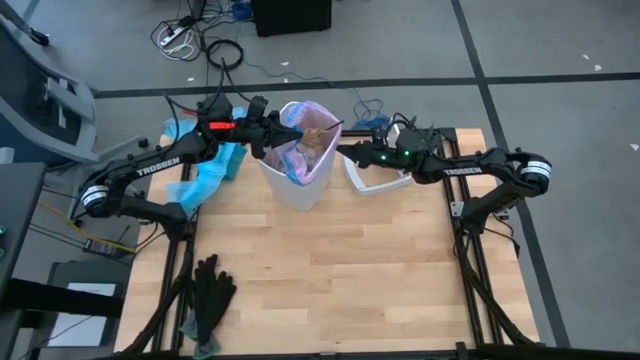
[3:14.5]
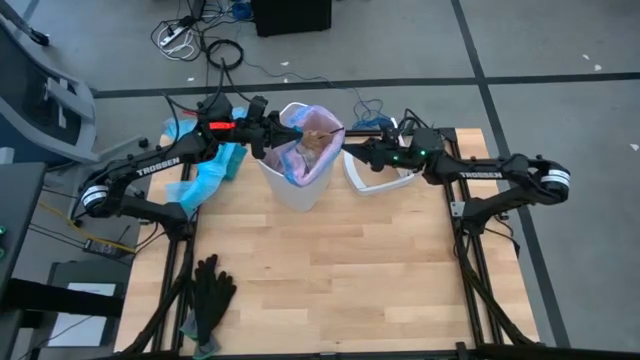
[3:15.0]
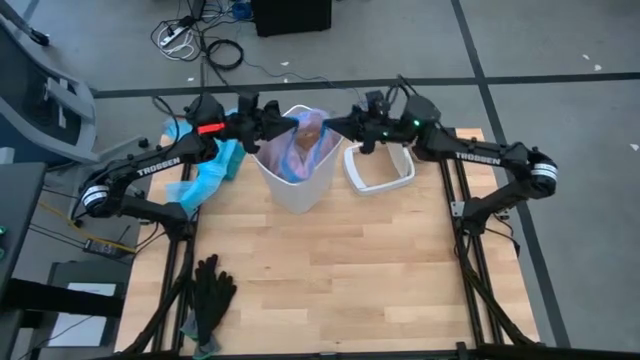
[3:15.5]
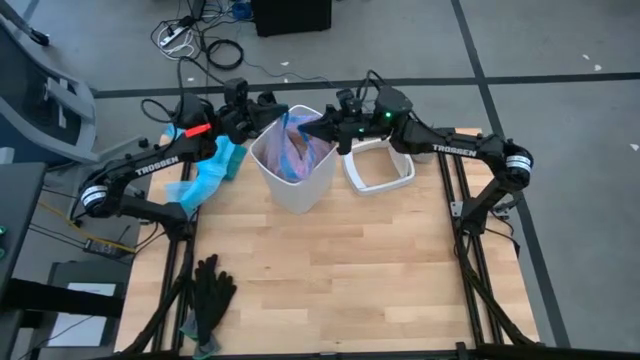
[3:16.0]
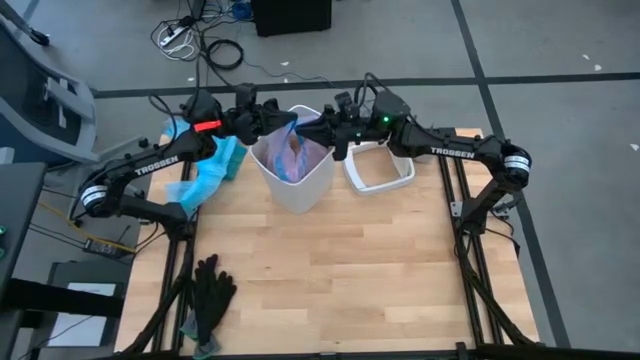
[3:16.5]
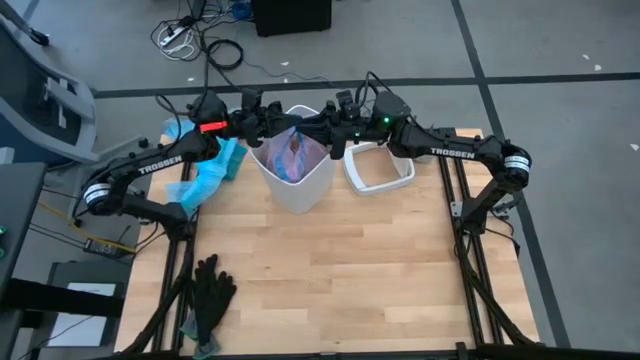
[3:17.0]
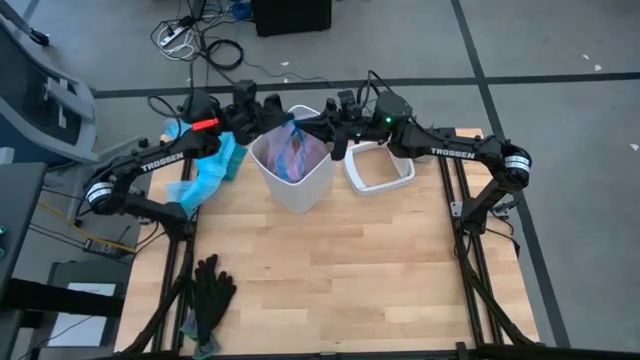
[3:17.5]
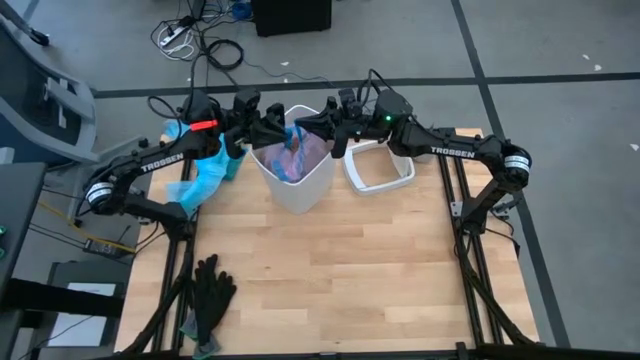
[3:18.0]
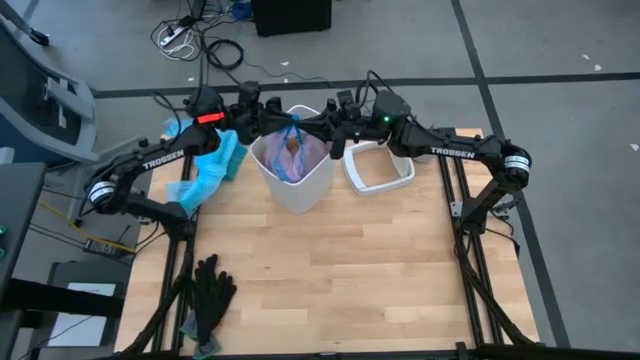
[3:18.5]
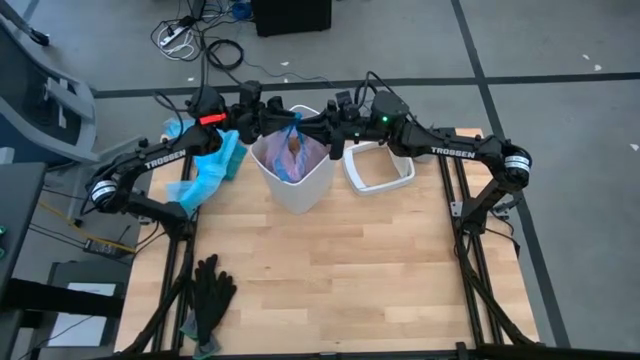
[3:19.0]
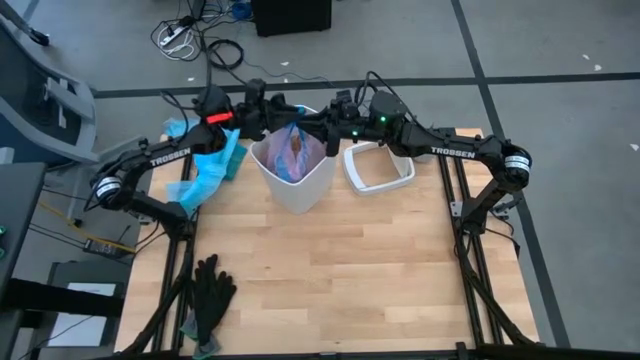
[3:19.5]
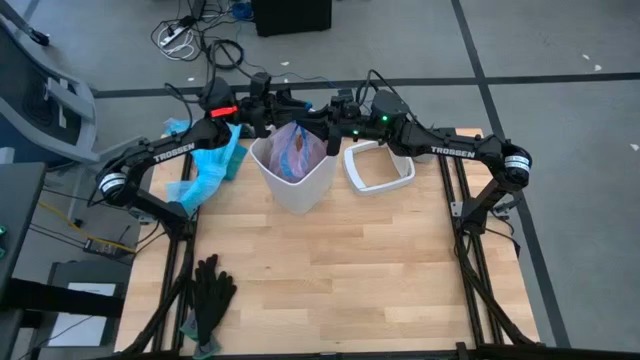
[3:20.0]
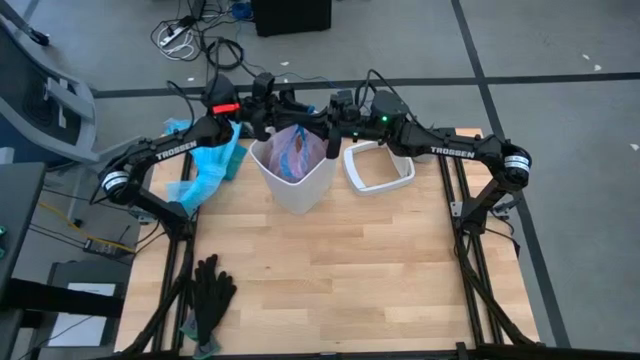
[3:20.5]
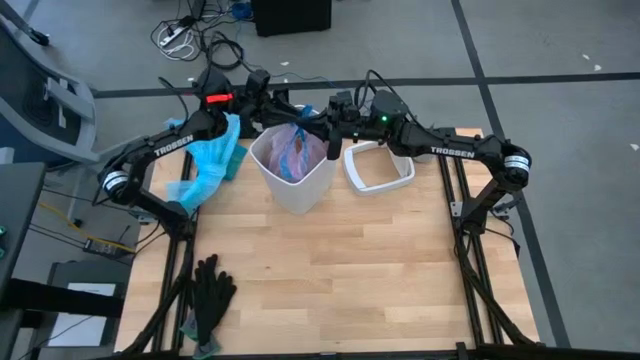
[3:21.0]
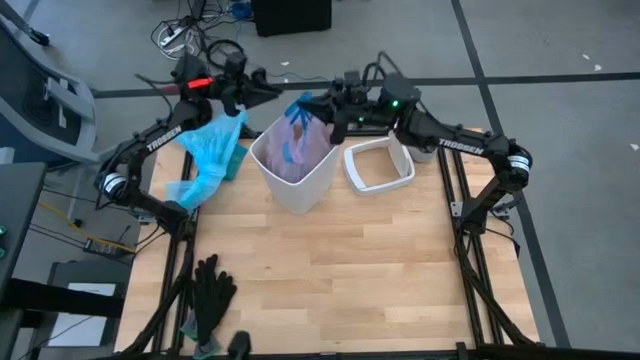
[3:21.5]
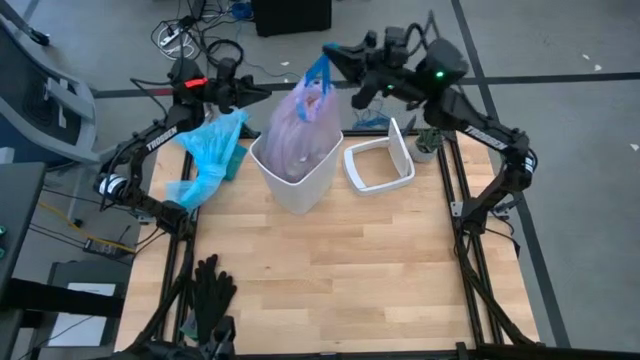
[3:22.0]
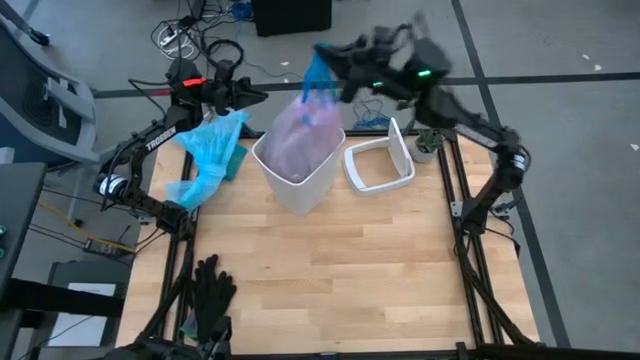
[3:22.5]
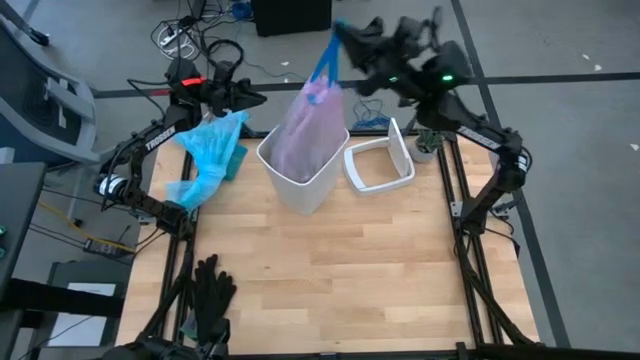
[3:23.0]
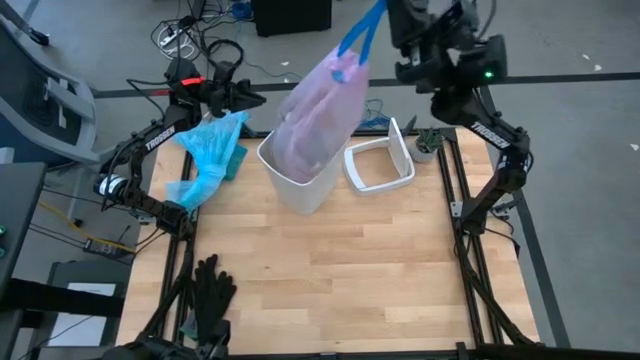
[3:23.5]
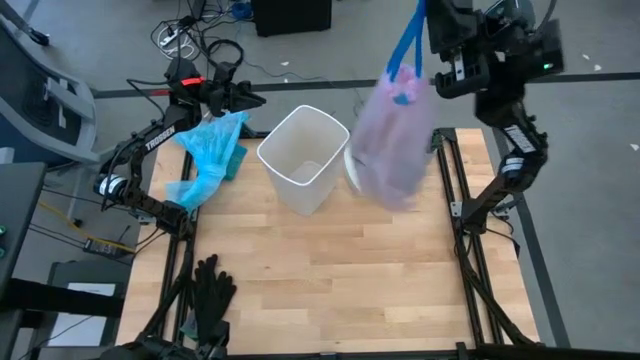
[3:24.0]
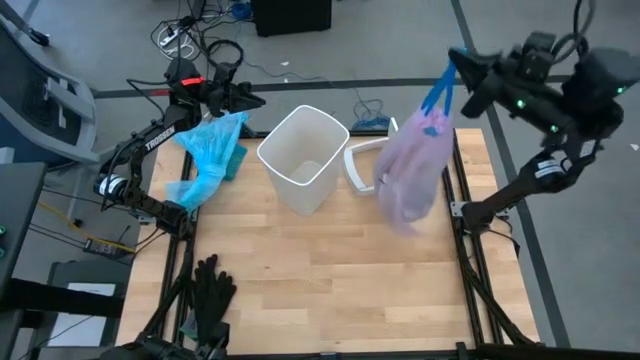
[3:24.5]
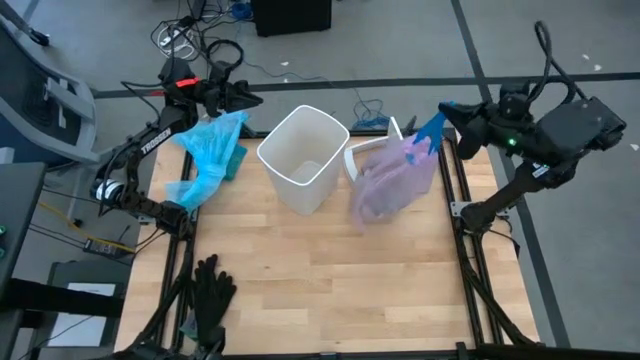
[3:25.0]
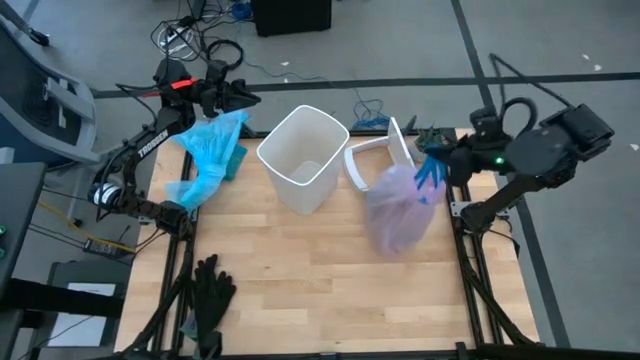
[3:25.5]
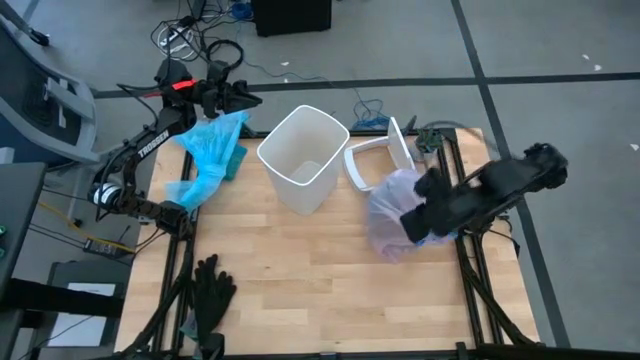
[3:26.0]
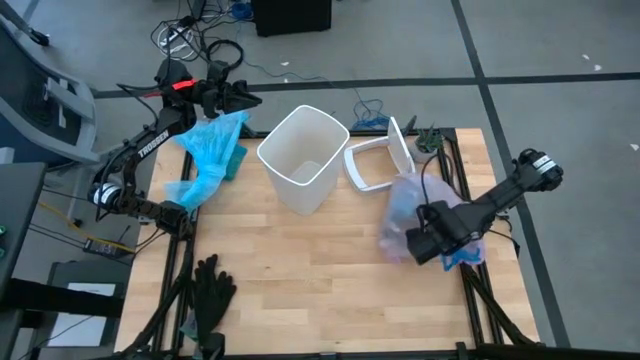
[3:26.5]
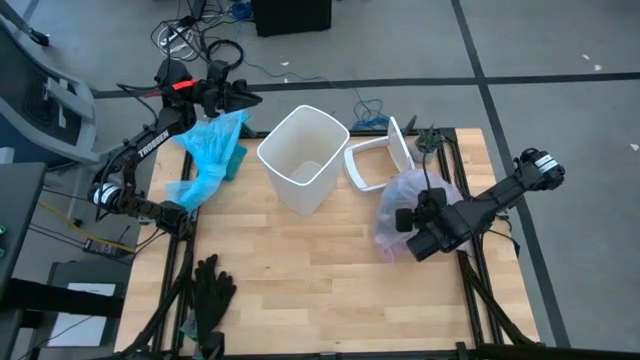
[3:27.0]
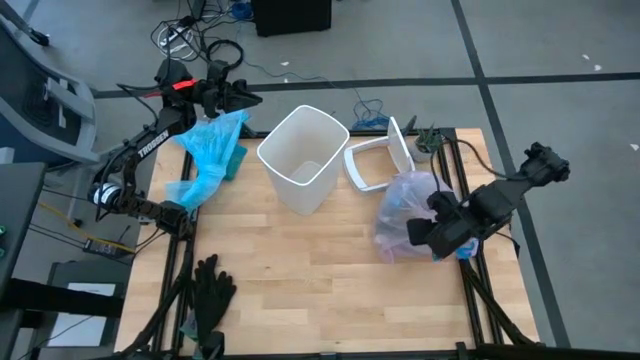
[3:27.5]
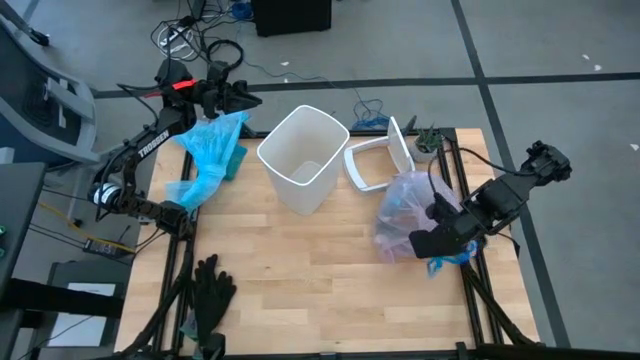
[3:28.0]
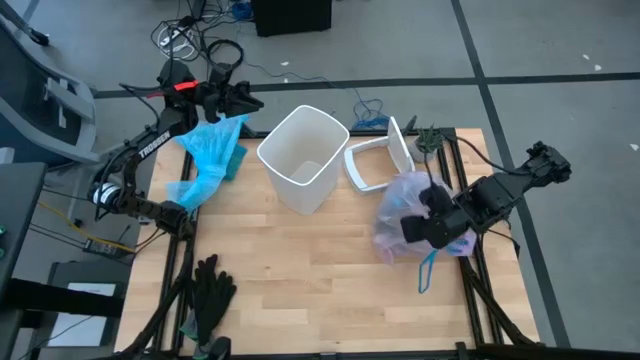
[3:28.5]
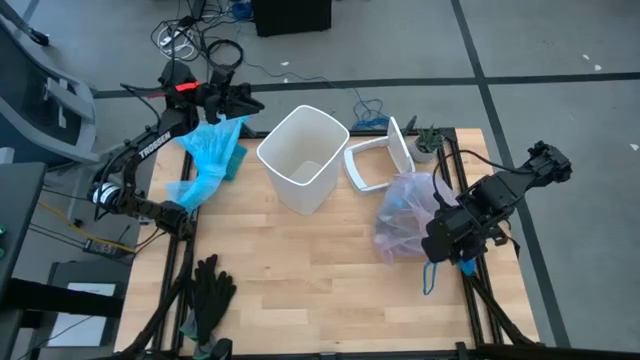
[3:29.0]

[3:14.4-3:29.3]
Task: place trash/remove bag and relplace
Remove the pink trash bag from the trash bin

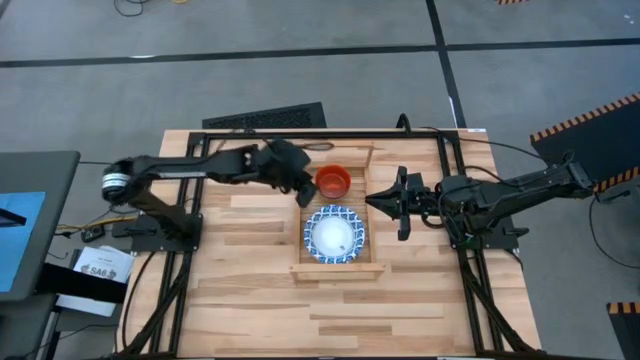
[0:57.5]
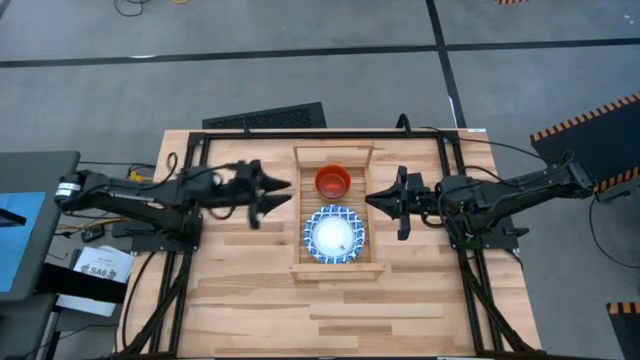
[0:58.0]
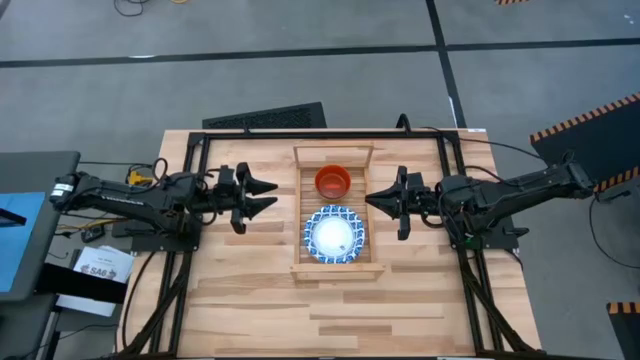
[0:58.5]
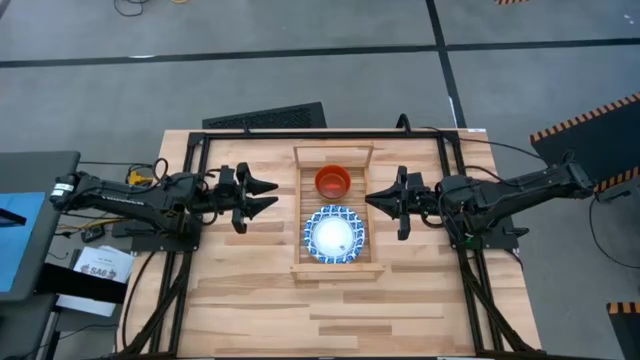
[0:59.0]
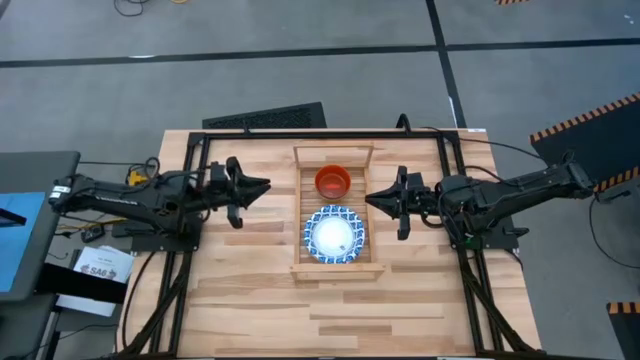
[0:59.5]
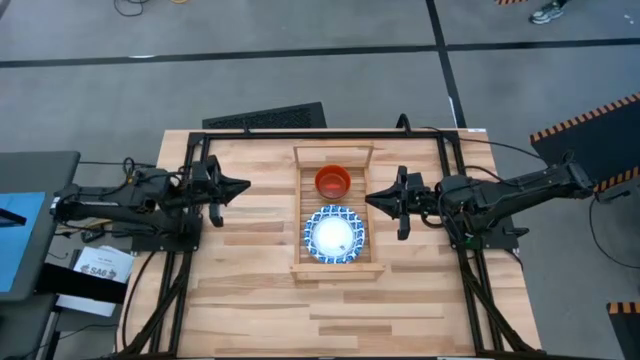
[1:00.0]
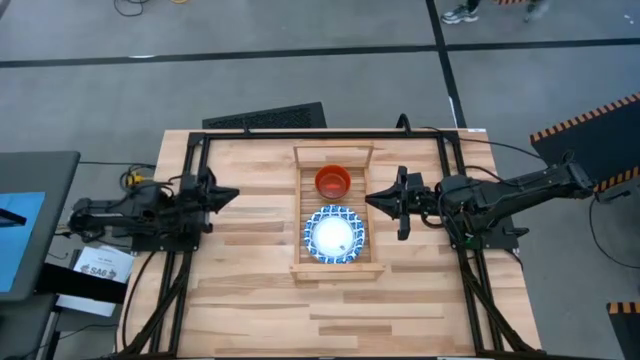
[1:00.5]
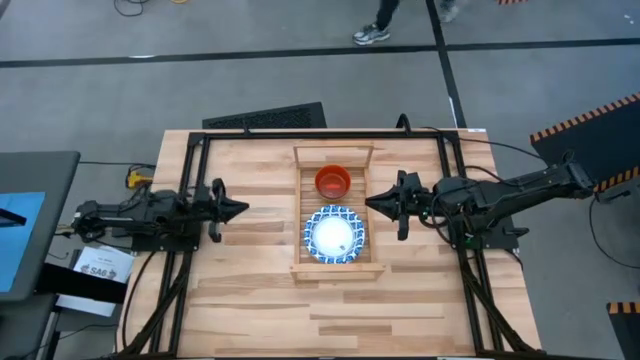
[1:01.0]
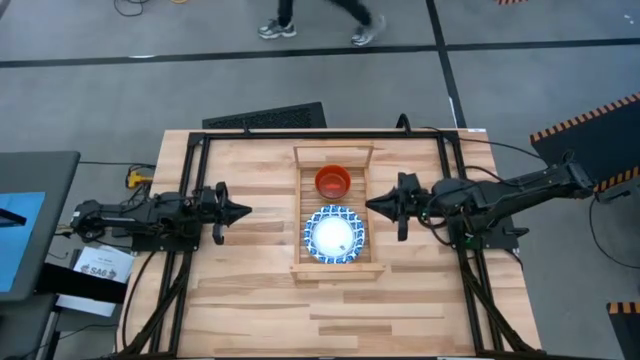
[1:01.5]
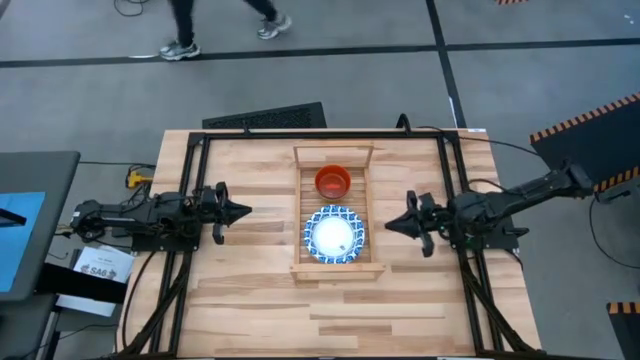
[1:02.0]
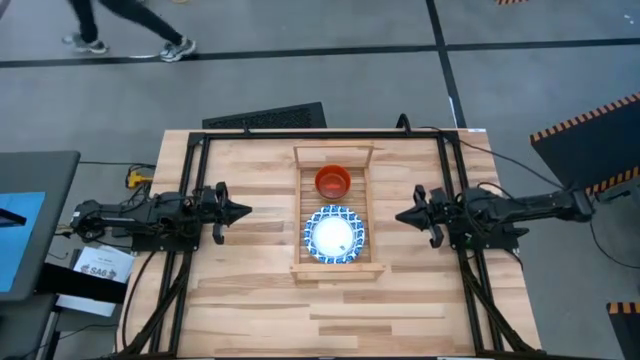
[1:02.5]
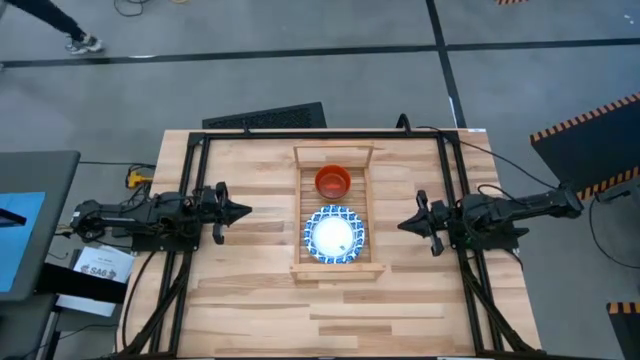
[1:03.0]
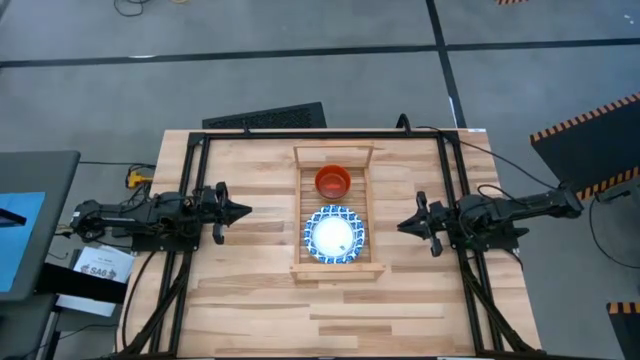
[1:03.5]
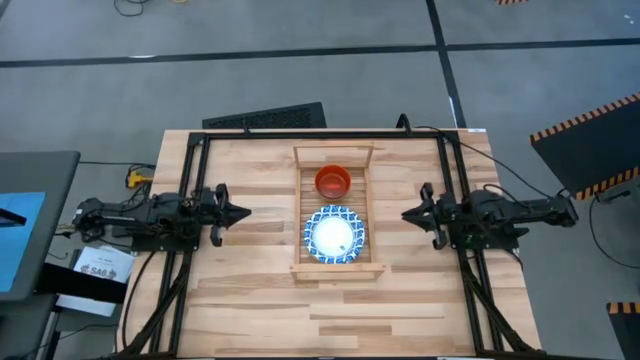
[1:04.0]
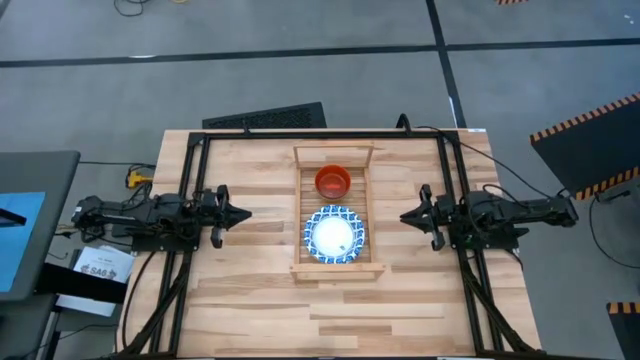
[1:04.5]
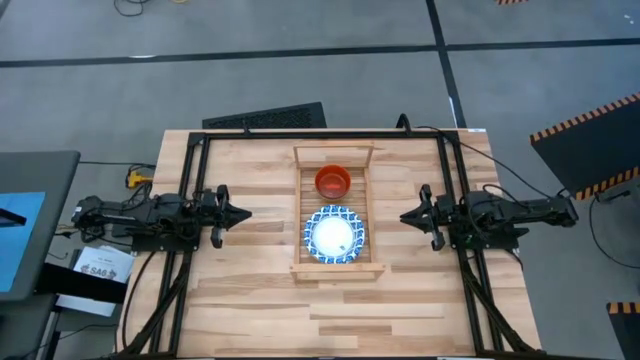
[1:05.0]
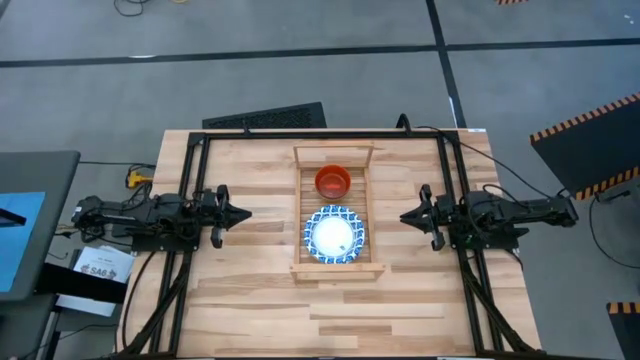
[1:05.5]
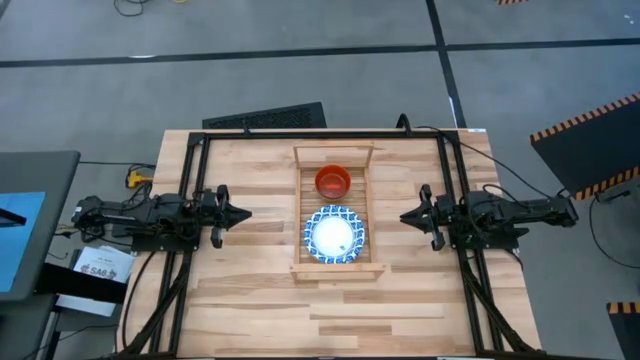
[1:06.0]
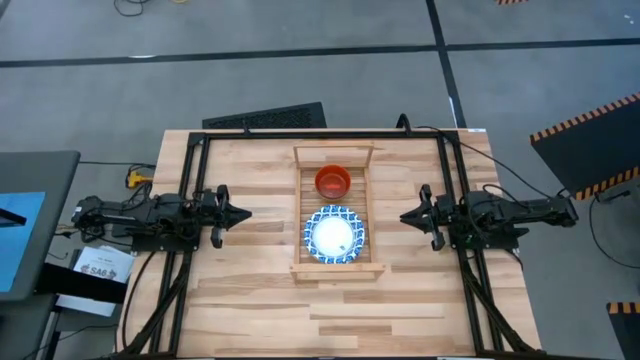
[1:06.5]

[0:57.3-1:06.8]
Task: Place and stack bowls onto a shelf
Return to Home Position
